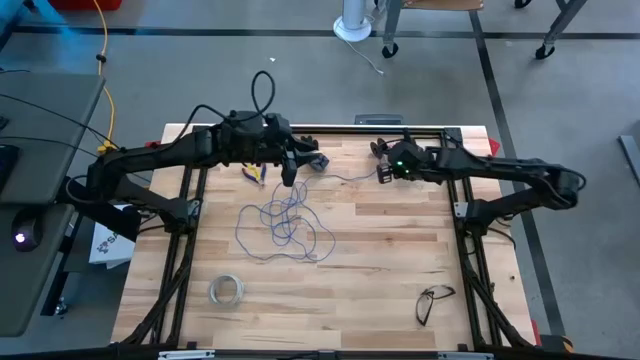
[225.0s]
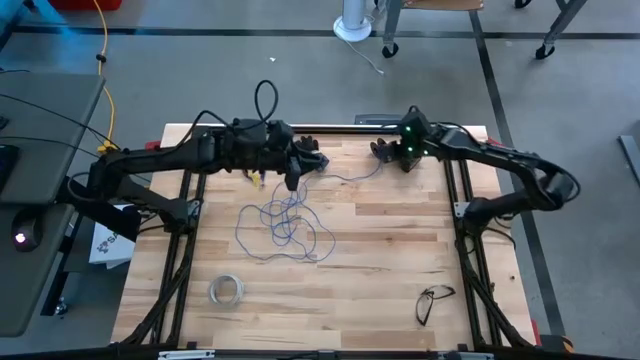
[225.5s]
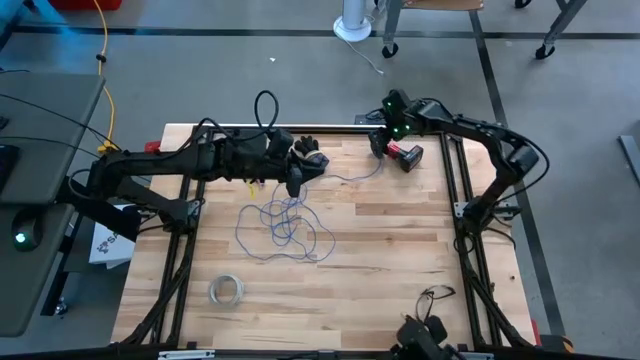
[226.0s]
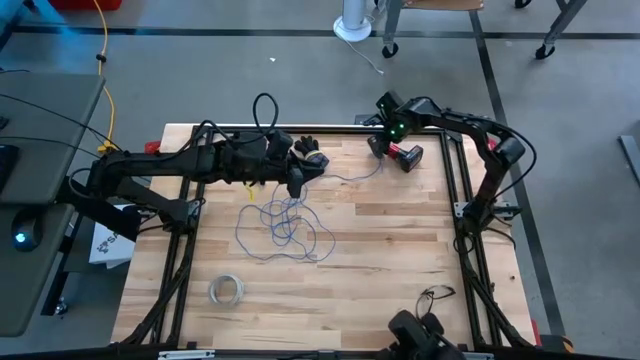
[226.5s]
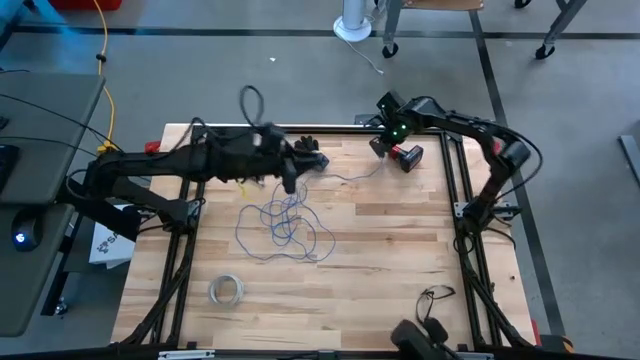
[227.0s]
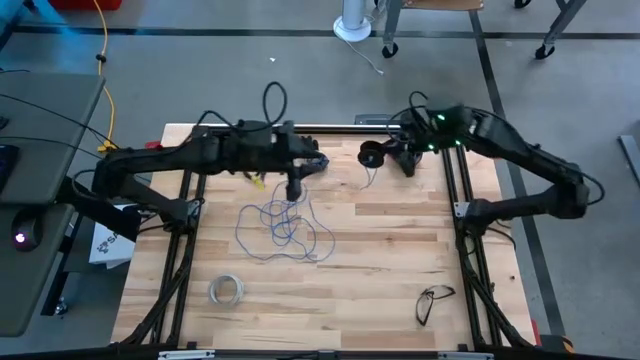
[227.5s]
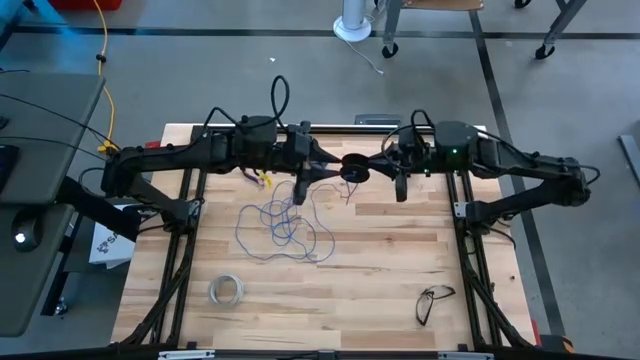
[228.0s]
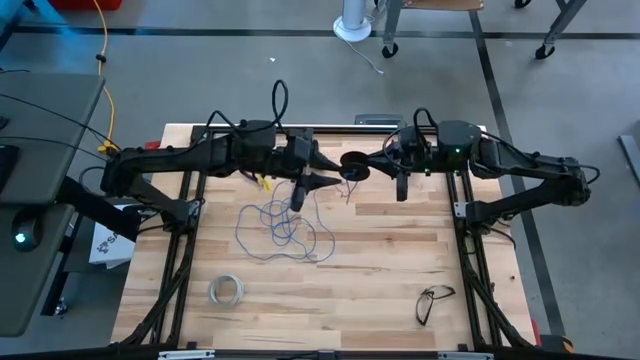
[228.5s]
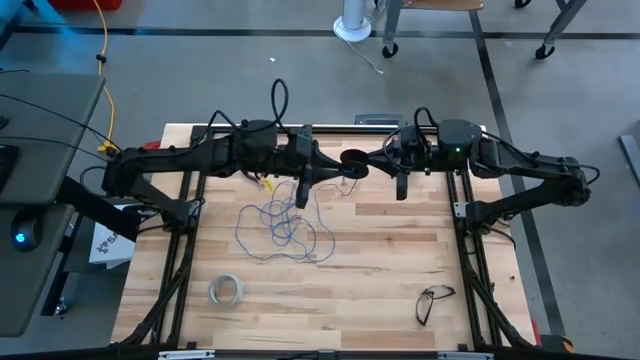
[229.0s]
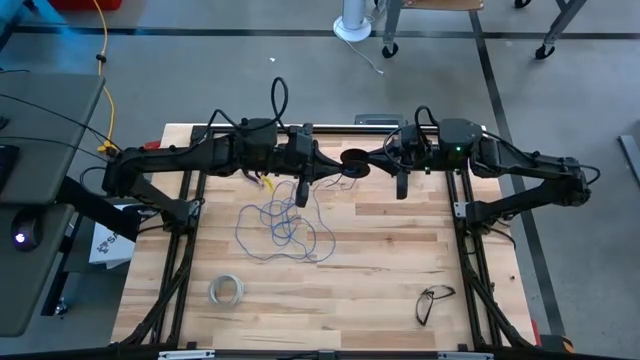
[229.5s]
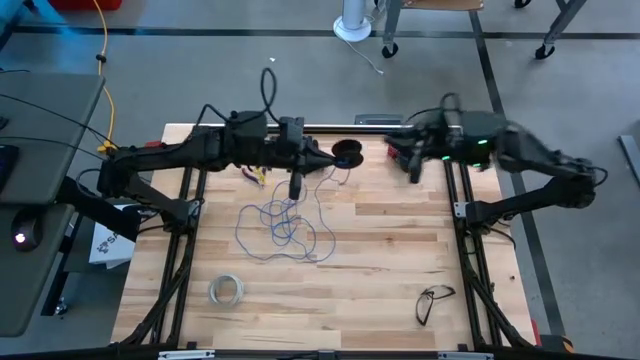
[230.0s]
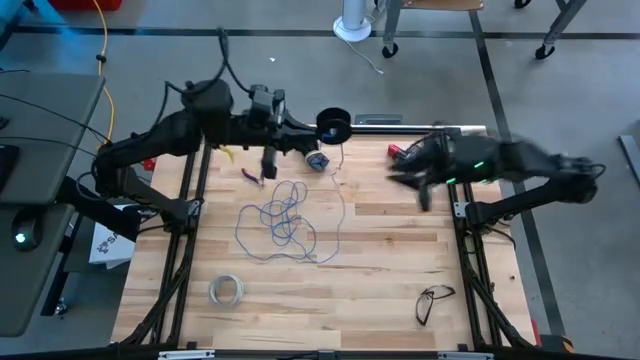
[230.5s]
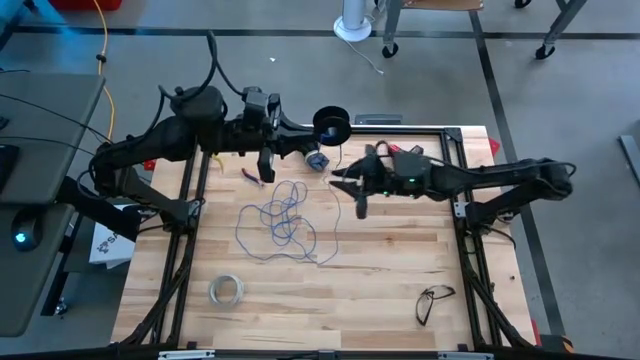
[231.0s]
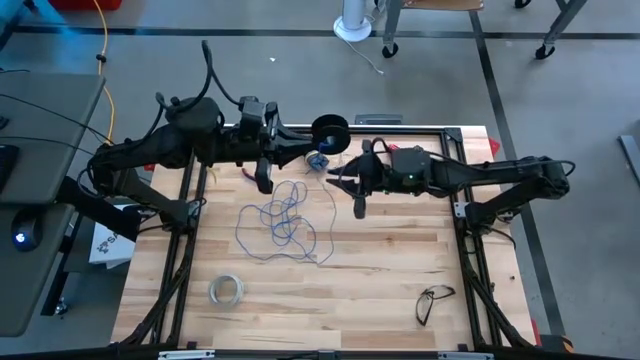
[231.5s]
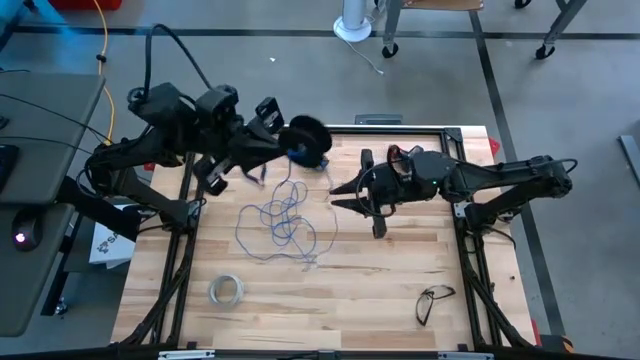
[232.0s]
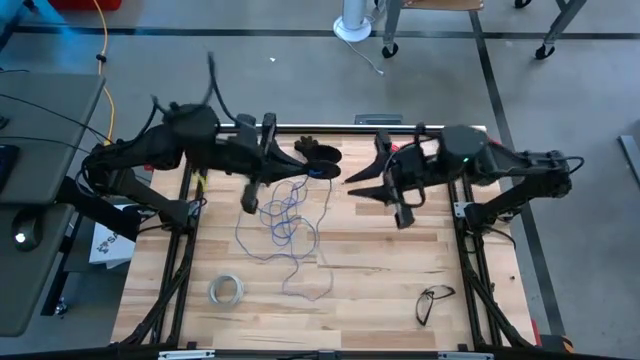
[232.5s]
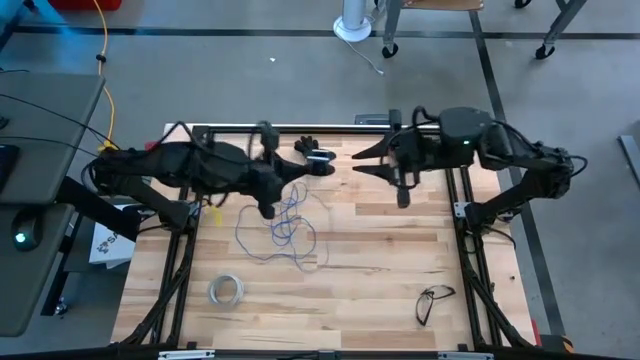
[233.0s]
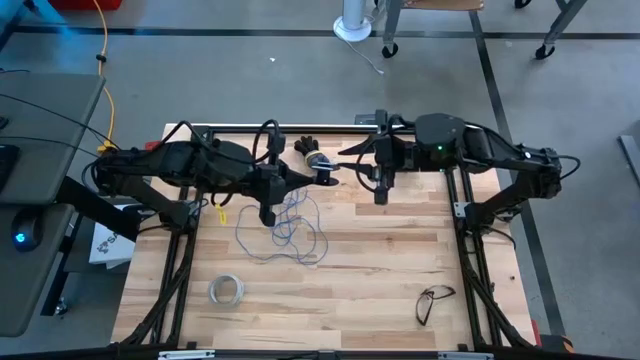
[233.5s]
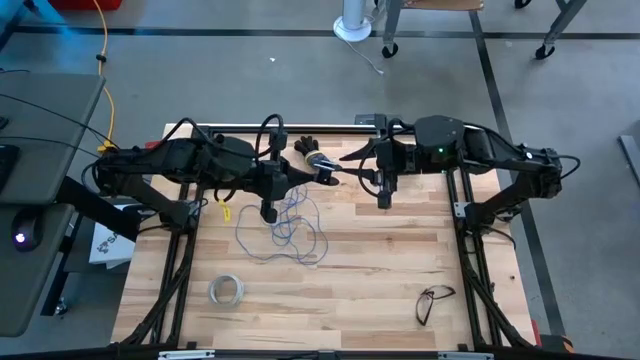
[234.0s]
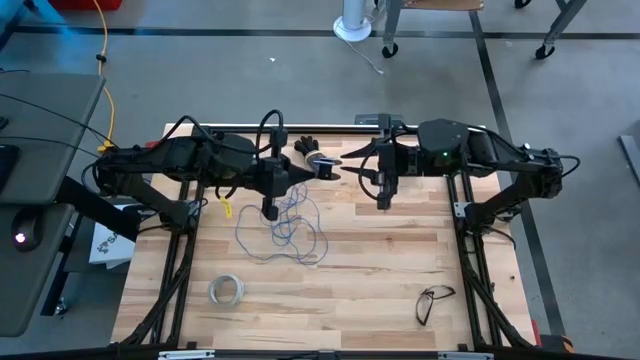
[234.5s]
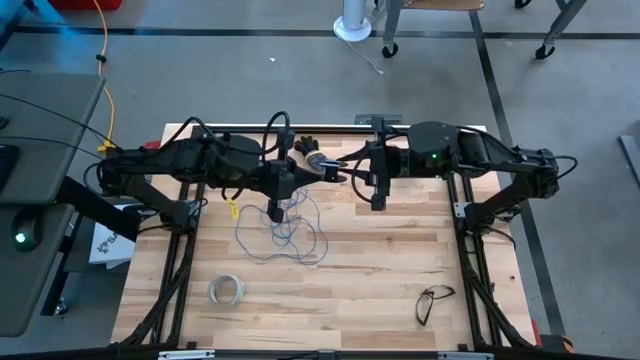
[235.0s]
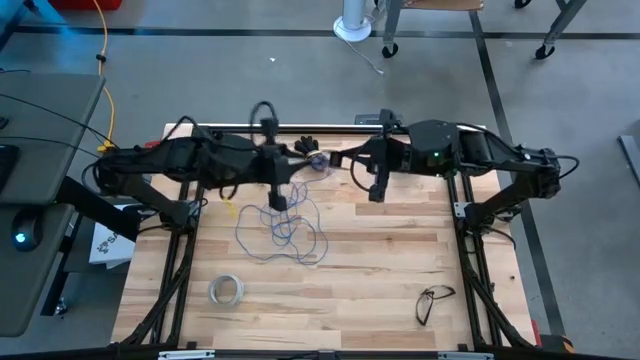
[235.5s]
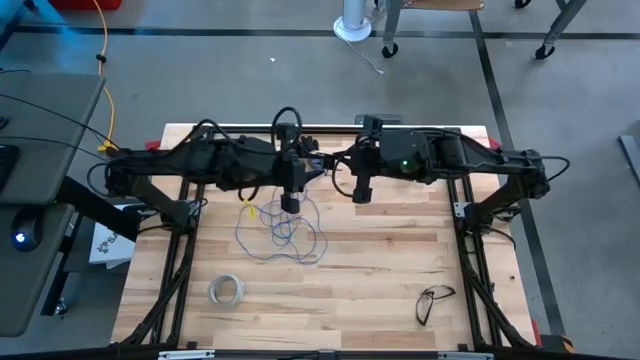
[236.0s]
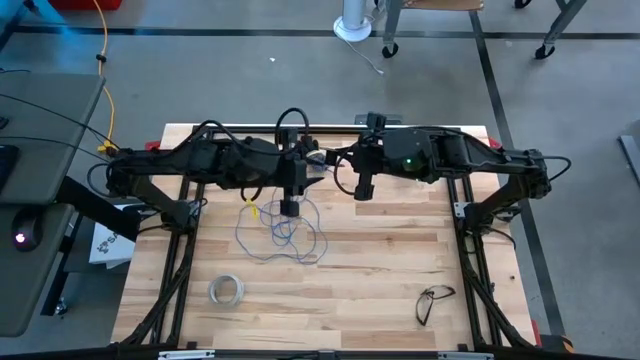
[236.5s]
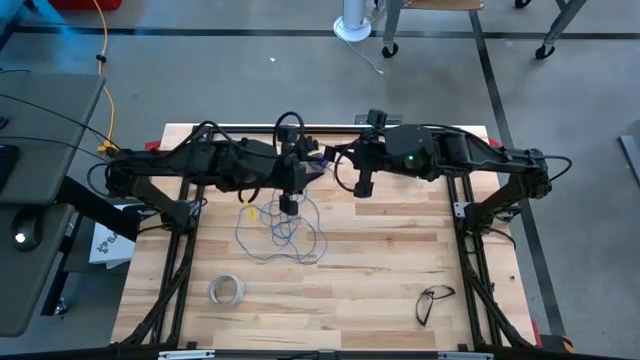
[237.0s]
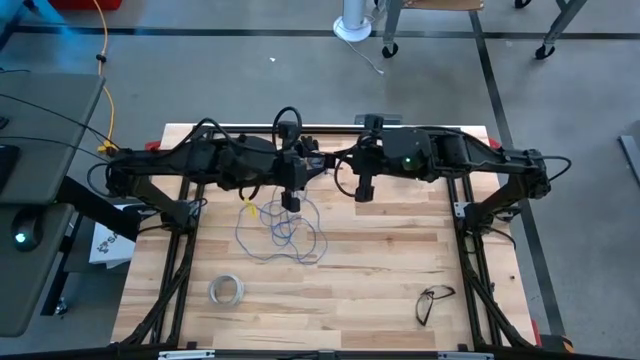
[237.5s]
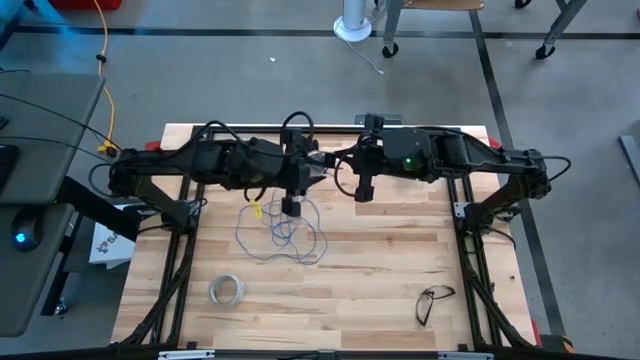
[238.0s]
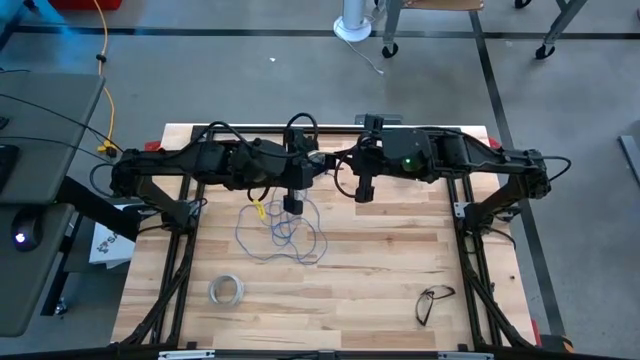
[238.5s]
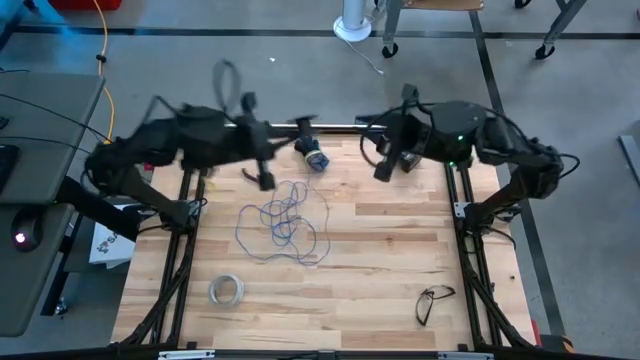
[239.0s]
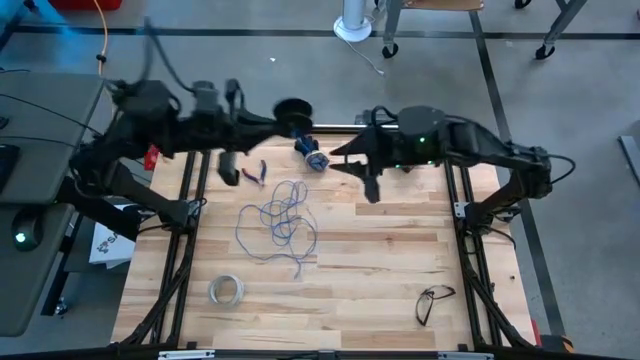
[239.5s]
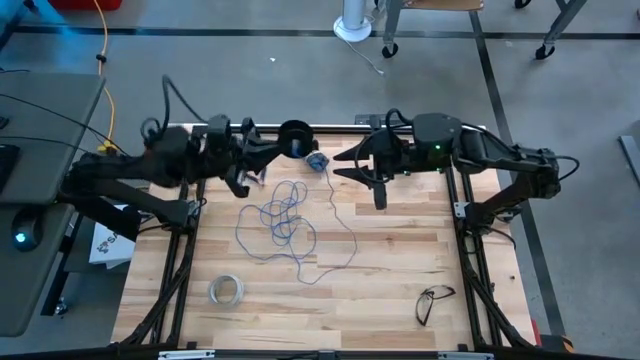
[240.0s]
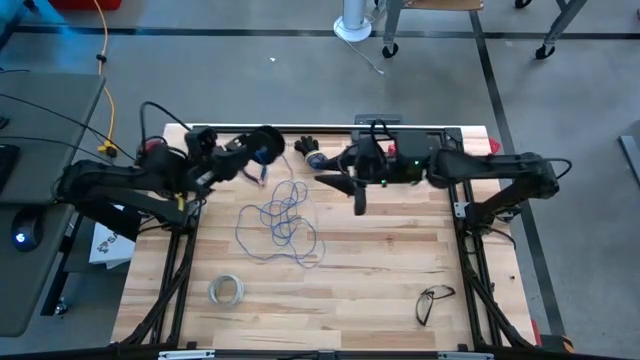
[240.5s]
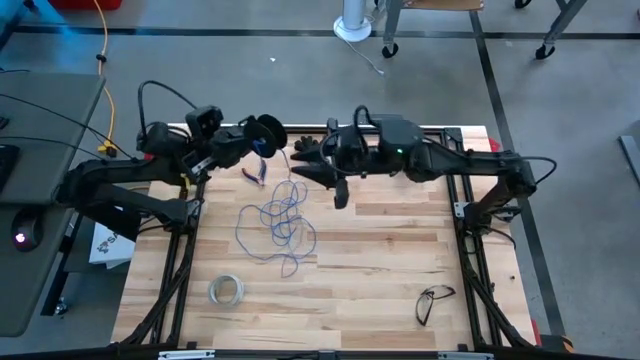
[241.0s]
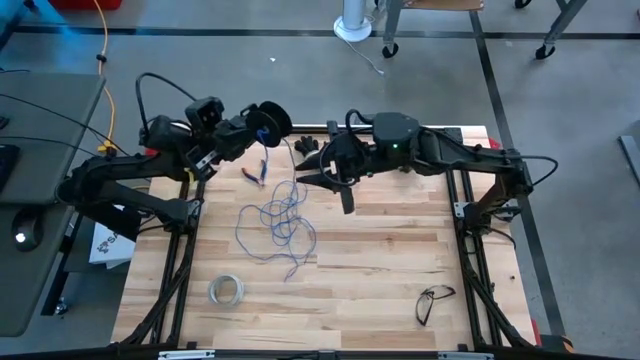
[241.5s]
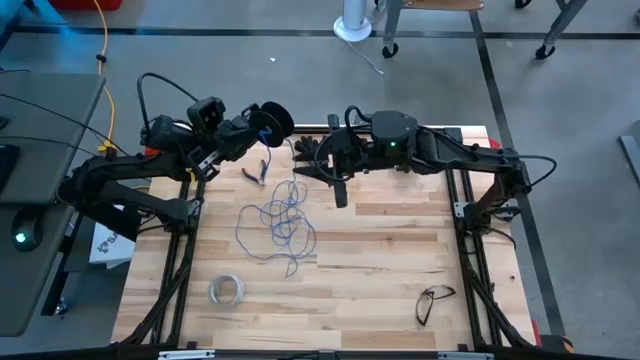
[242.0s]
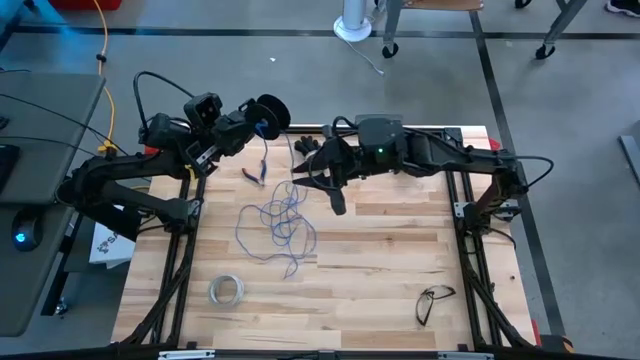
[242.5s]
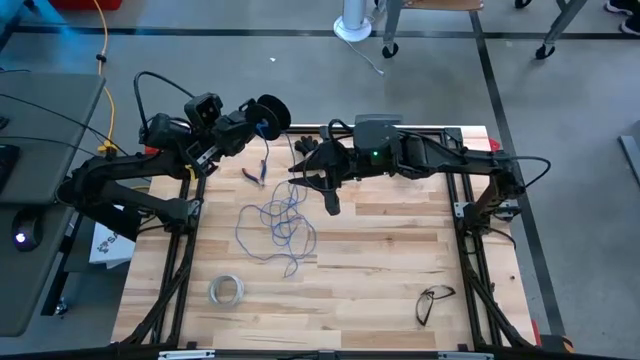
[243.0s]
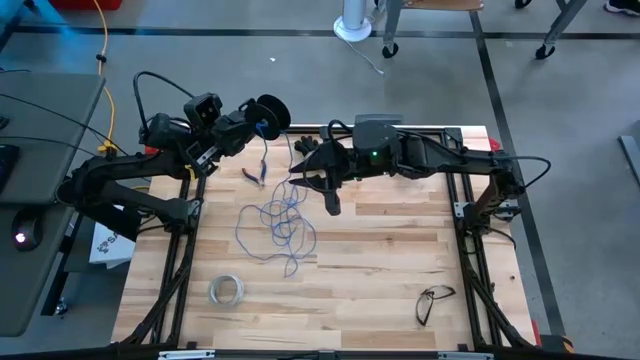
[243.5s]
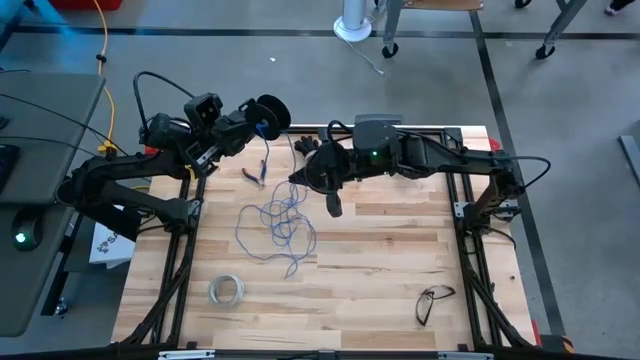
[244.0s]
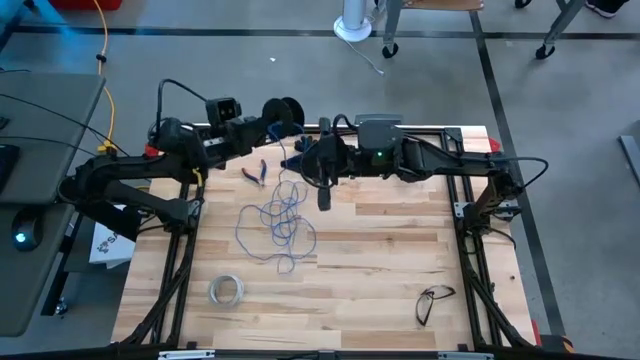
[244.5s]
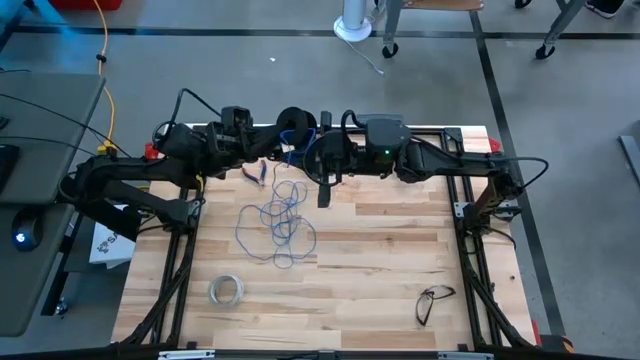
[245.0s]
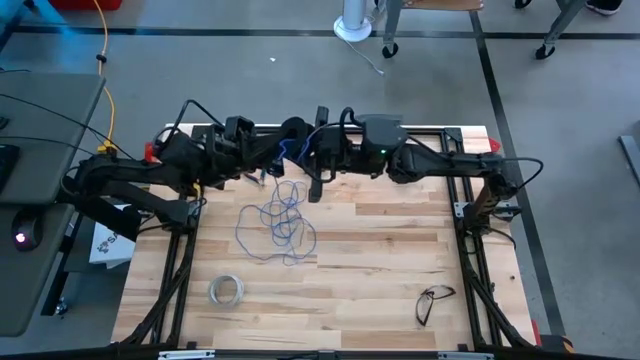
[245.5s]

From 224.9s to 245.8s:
Task: Coil cords
Coil the blue wire onto the black spool
